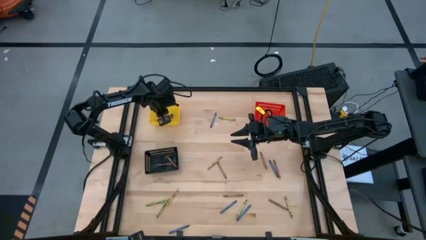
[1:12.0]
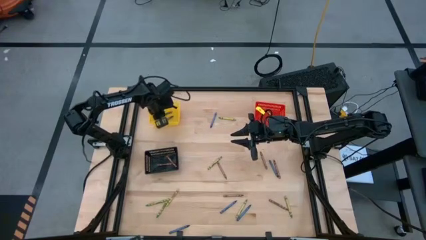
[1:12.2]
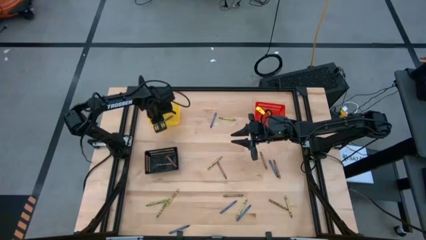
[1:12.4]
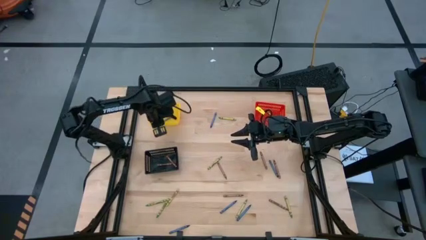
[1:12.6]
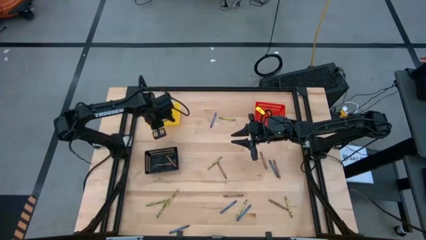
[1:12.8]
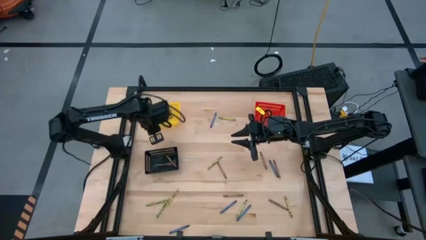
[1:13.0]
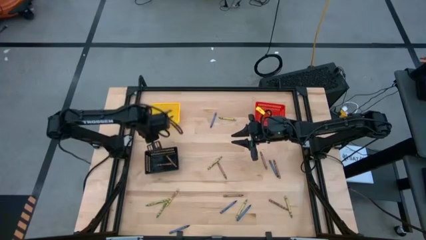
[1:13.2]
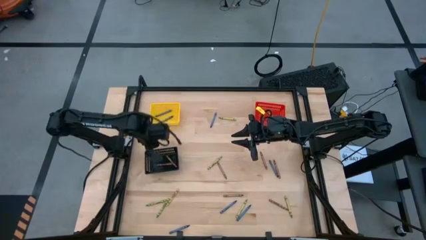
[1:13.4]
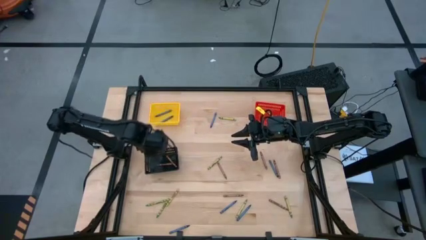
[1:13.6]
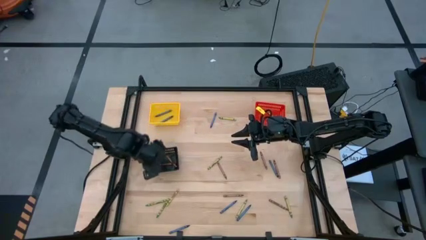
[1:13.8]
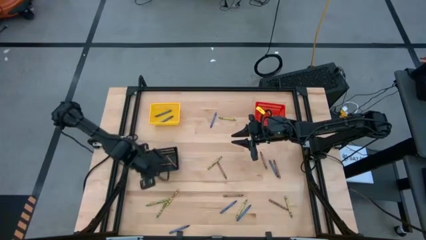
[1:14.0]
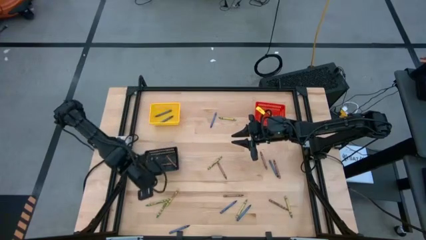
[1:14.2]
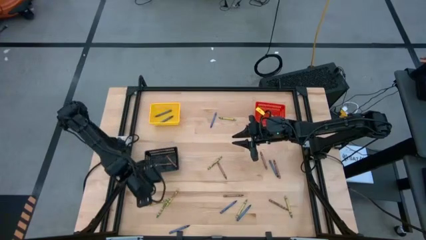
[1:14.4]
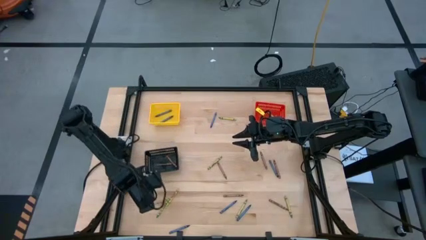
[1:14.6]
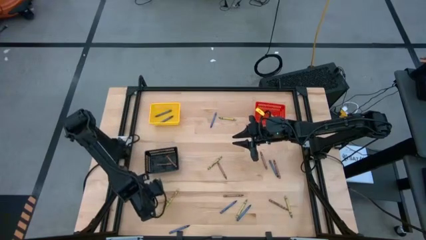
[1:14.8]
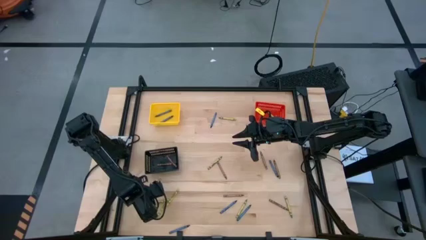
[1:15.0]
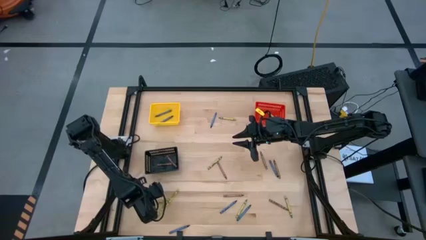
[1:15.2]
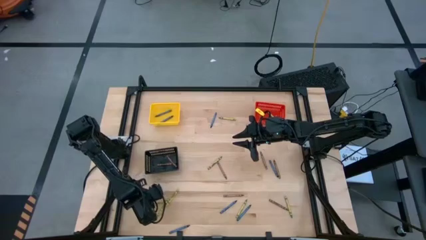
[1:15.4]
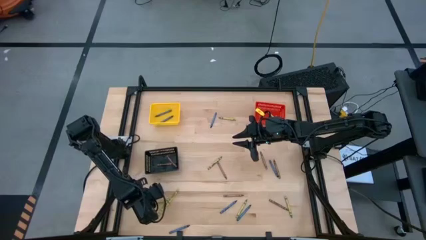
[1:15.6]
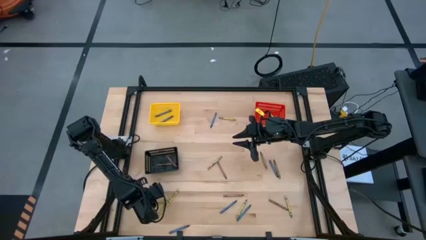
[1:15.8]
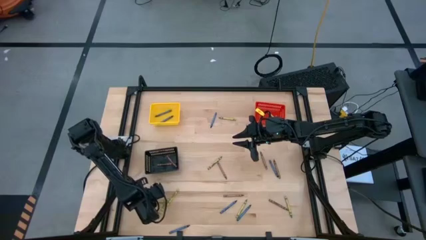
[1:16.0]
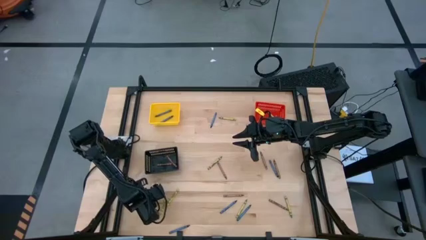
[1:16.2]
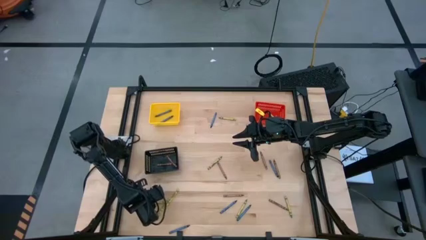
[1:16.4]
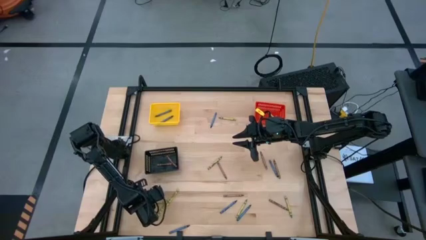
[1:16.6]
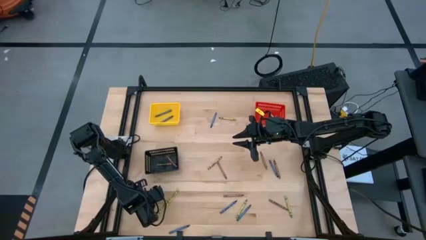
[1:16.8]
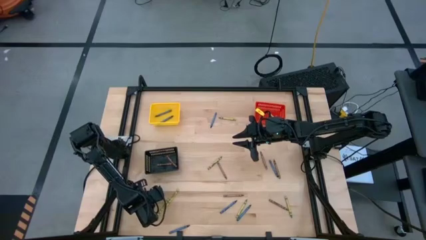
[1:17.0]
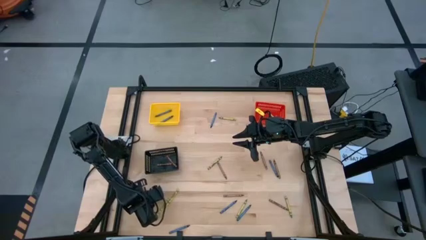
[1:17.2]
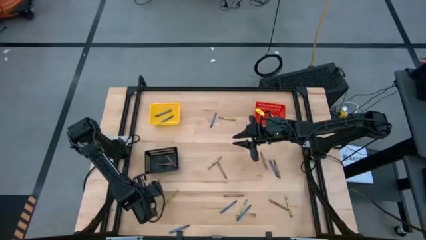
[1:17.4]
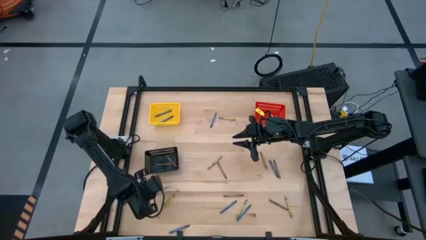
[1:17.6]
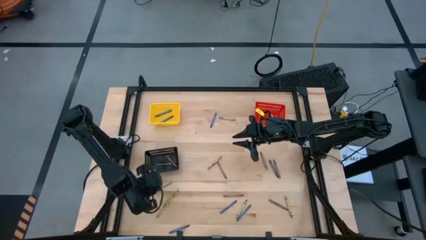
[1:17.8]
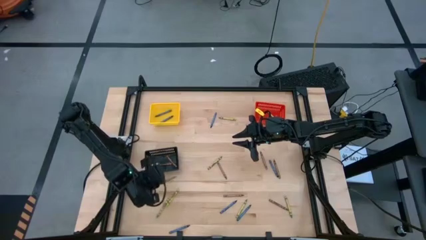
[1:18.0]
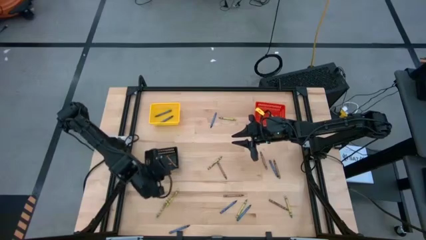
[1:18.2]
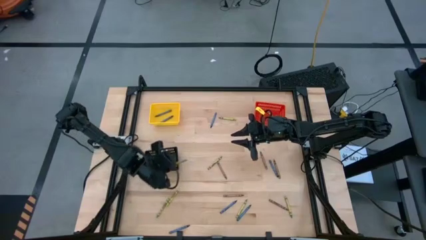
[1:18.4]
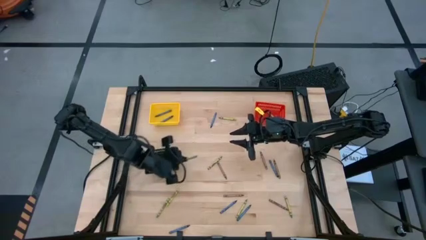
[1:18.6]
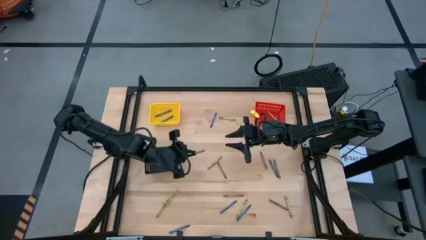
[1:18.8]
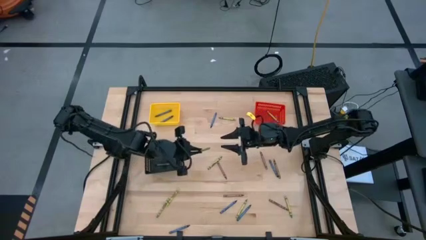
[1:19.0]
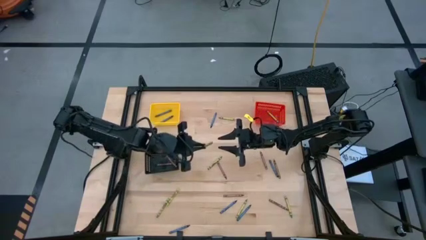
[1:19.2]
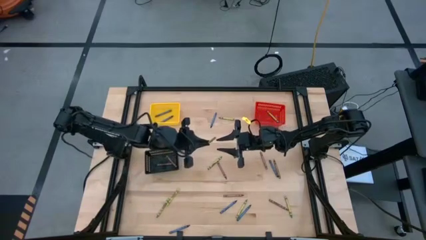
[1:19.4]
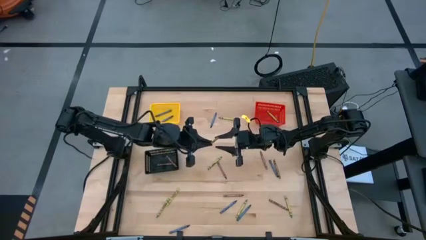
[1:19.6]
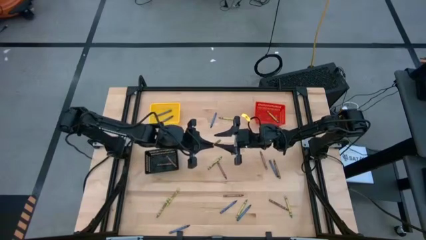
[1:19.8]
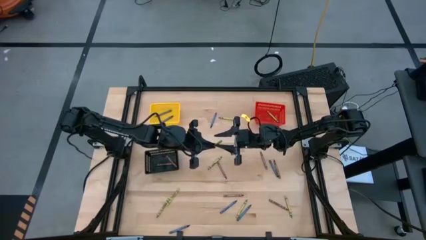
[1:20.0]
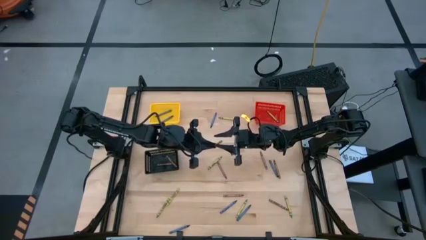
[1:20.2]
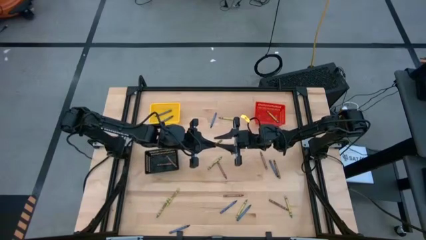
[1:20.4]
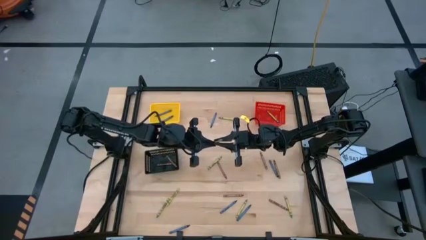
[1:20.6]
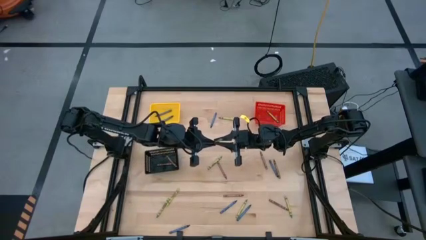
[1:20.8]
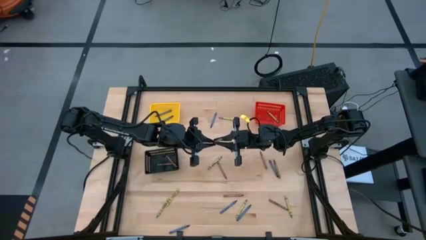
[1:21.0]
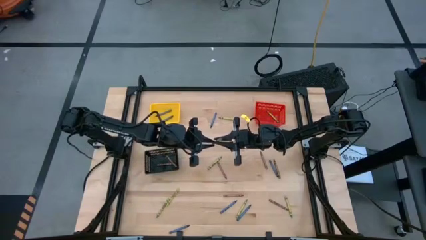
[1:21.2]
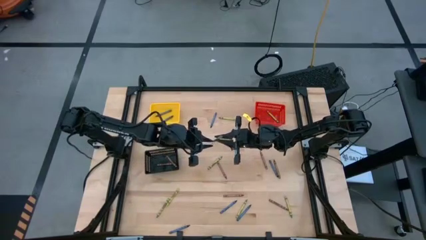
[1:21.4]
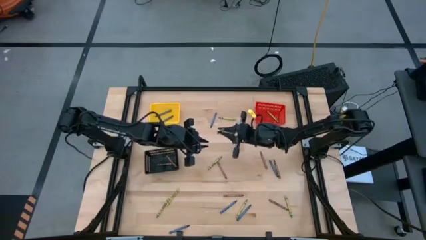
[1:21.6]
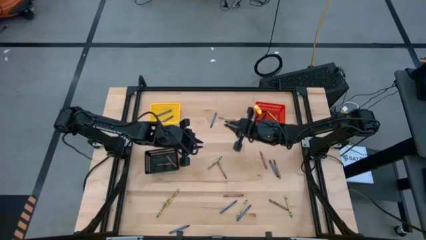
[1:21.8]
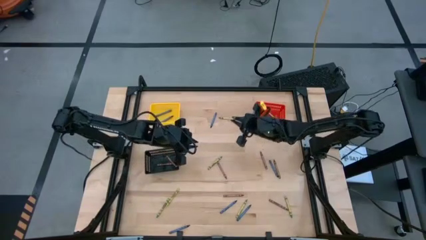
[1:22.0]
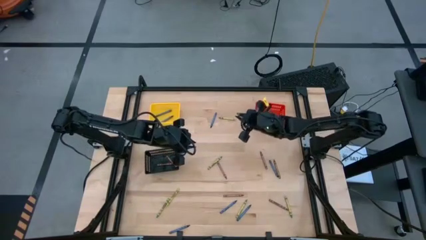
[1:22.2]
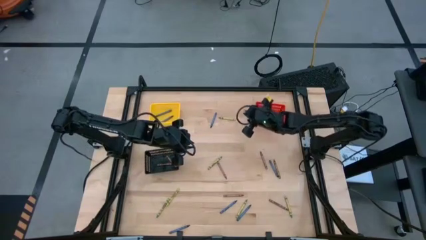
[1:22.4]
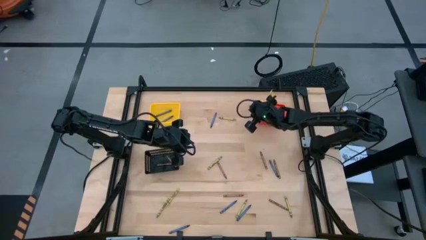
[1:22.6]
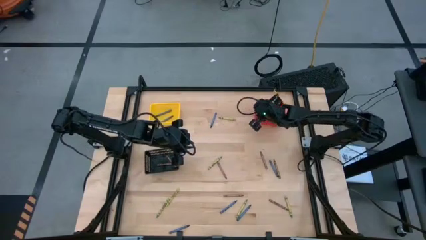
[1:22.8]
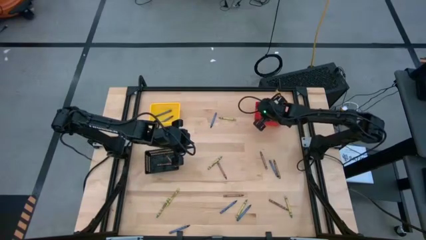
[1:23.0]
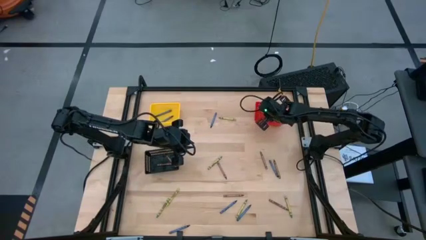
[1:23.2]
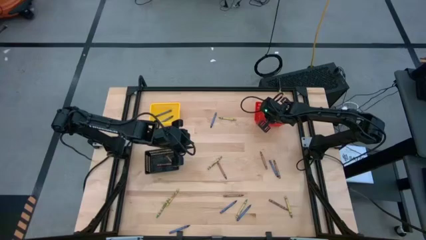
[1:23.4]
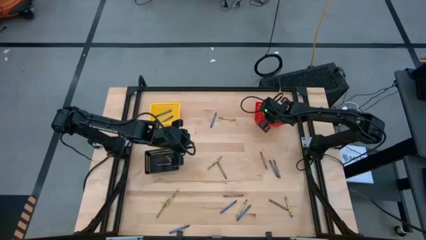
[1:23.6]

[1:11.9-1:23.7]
Task: Sort crayons
Put the green crayon into the red bin
